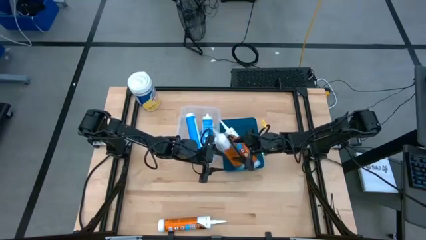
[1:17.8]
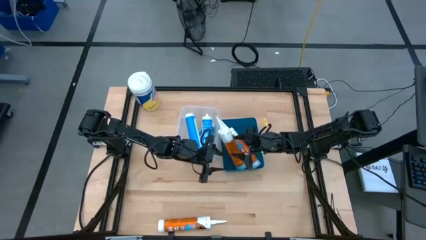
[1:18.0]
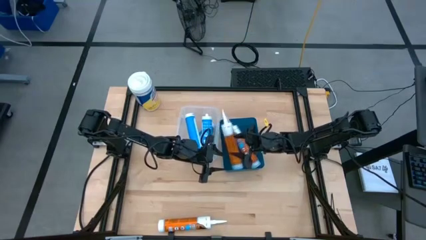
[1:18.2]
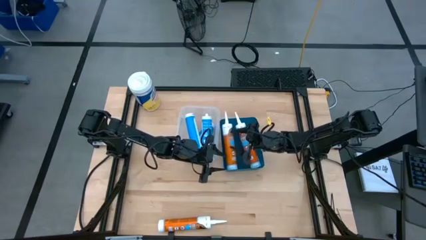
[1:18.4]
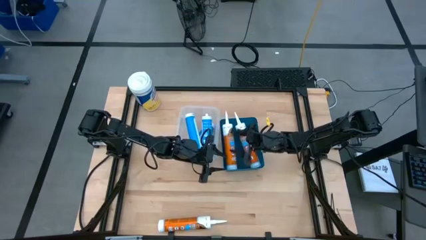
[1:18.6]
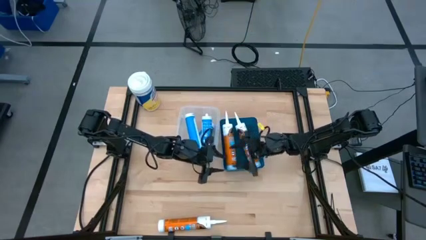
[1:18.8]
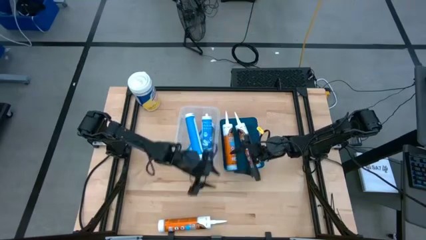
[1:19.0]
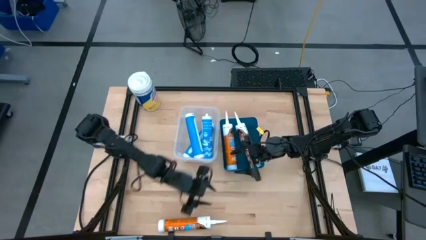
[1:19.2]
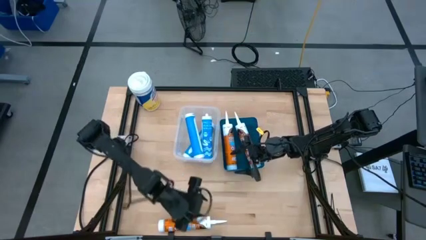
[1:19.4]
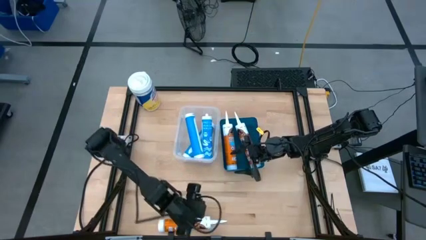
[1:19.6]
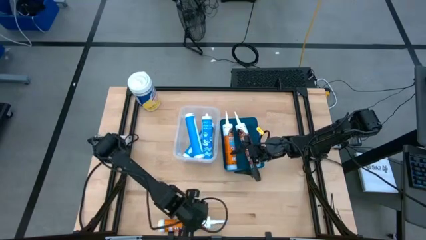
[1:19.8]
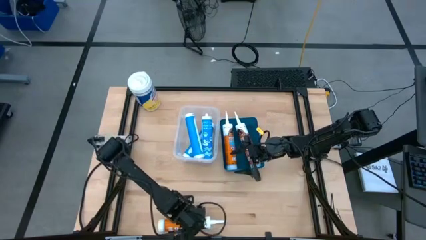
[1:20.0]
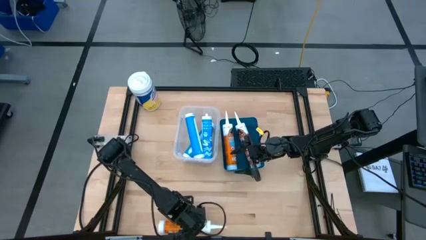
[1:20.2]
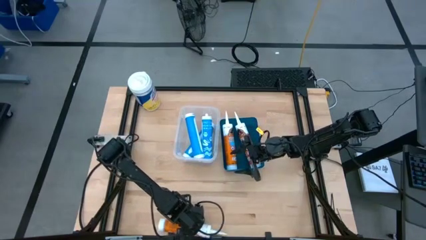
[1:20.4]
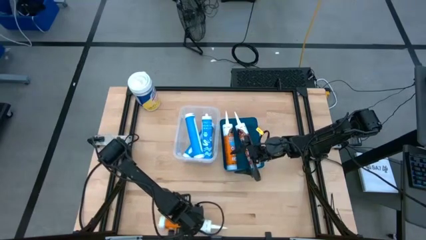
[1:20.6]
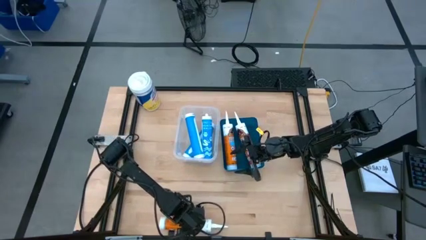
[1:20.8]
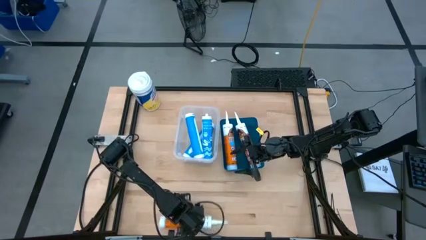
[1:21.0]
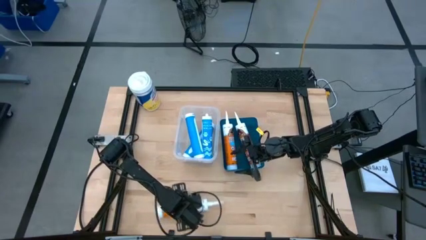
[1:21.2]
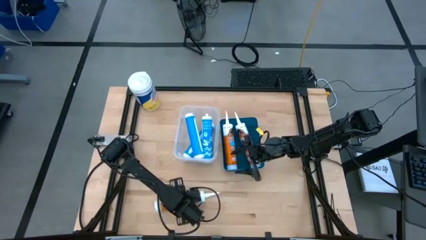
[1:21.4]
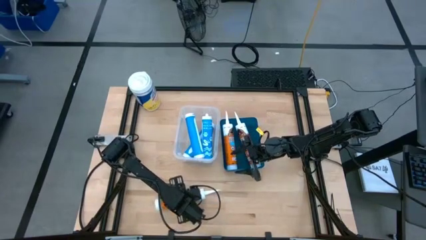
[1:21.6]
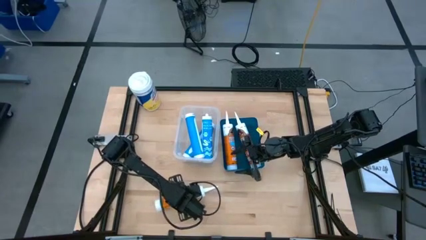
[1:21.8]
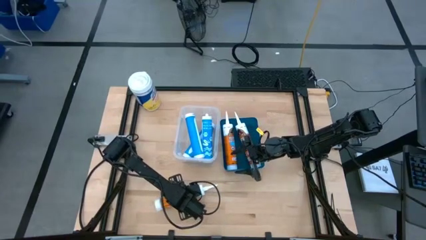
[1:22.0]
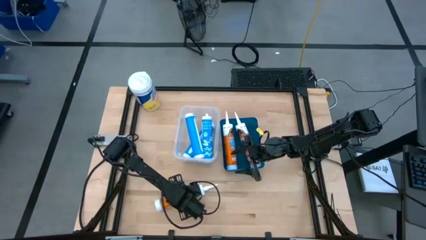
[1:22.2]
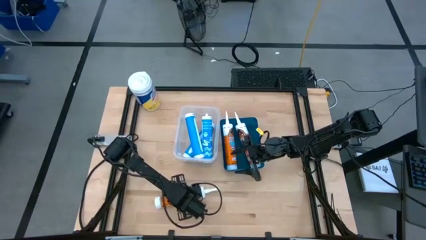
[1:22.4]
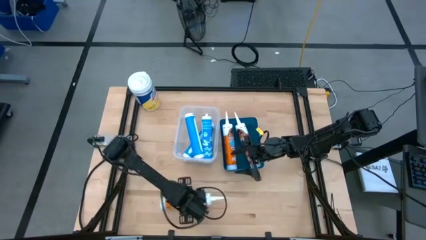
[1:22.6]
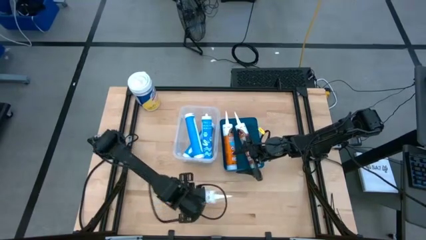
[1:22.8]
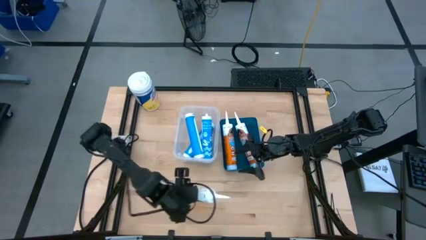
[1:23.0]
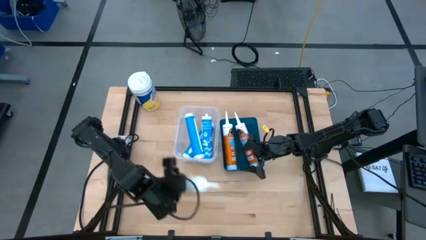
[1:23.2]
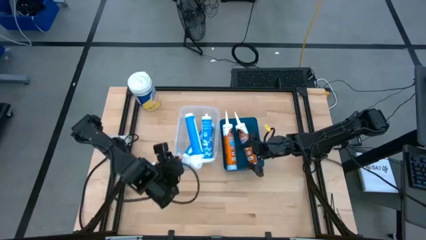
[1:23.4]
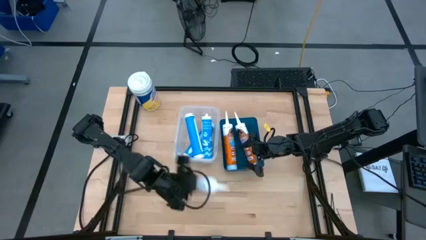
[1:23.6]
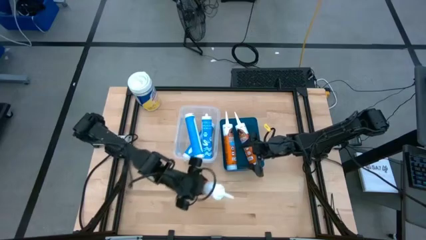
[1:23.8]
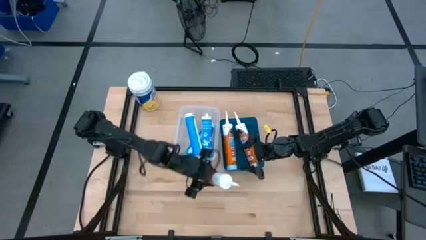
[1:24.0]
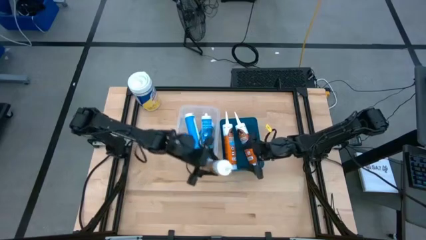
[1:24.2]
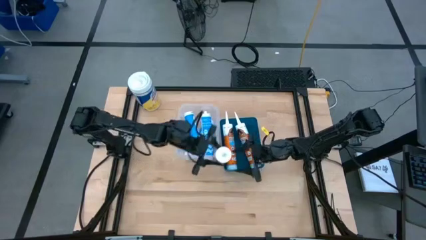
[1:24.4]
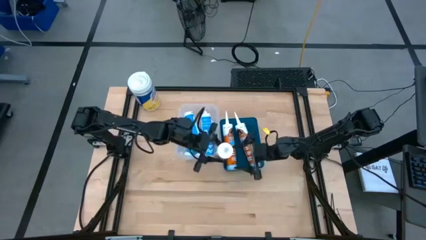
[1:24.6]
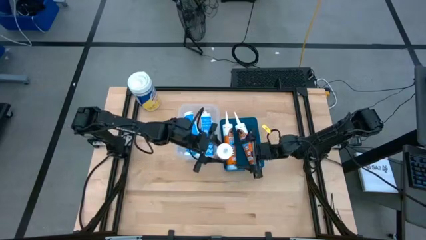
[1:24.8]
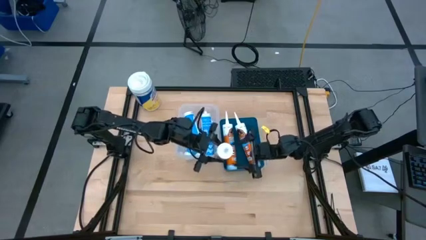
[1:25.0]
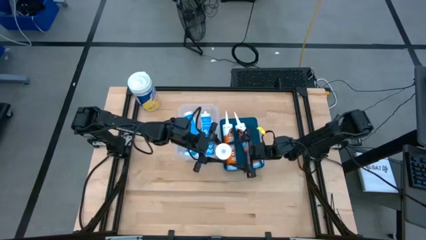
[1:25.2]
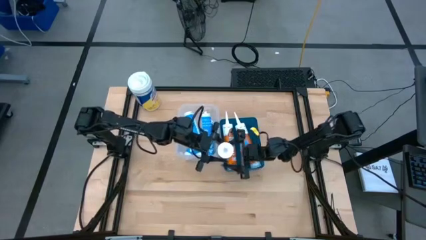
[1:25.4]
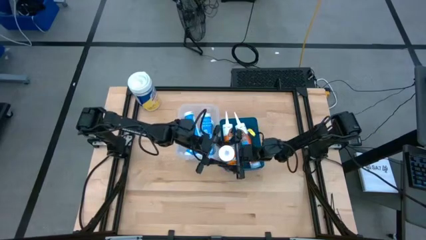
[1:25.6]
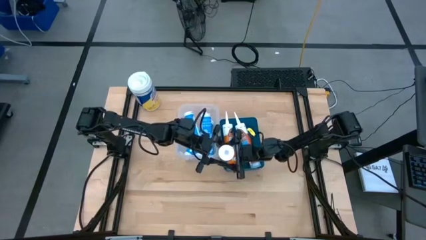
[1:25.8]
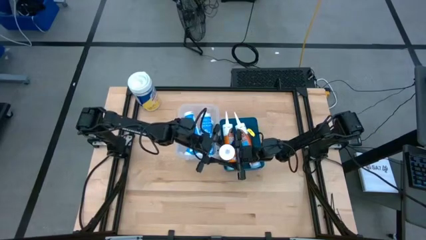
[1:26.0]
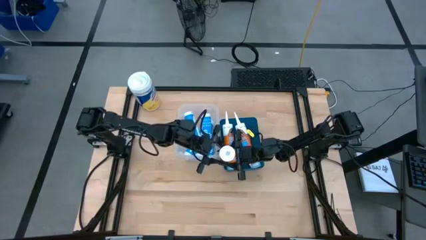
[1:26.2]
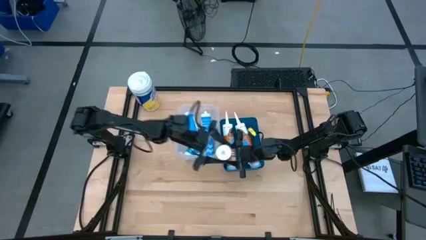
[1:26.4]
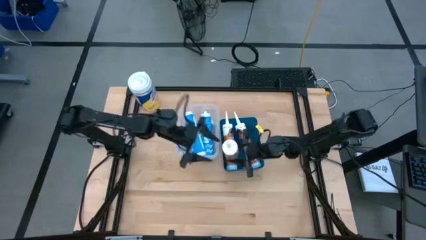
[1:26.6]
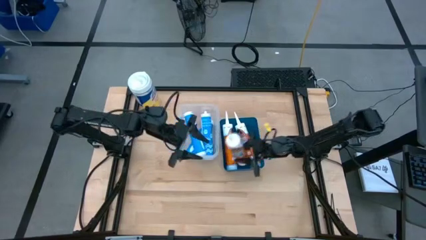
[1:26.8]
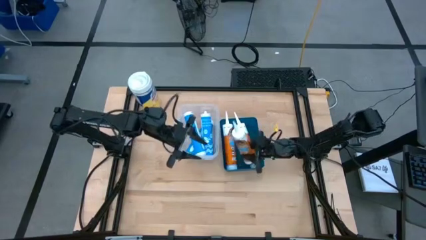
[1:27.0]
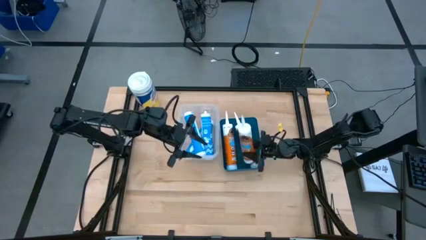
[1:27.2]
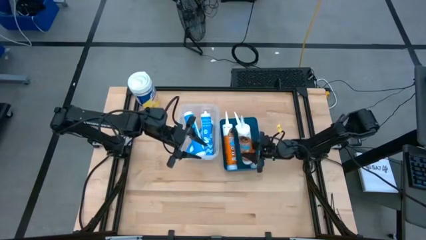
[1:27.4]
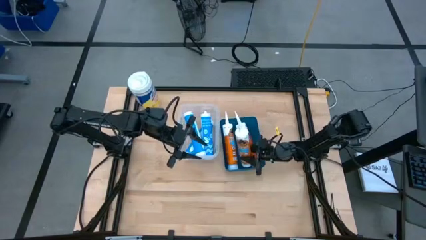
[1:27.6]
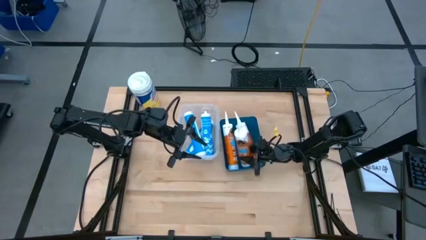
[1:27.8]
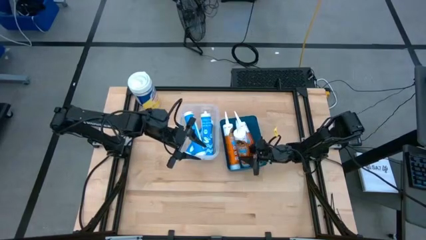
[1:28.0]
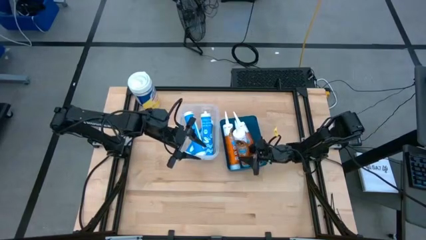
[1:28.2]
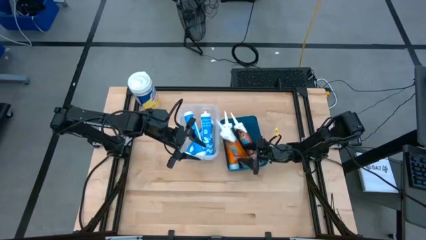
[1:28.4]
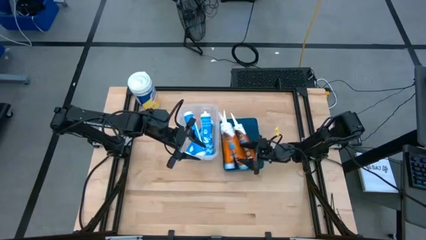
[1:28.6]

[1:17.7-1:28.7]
Task: Pick & place silicon tubes, Sealant and Lysol wipes
Put the orange sealant into the blue bin

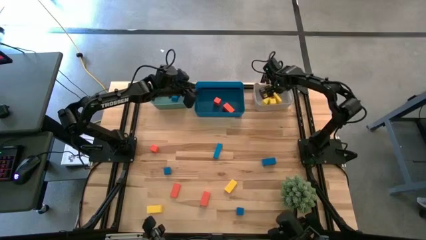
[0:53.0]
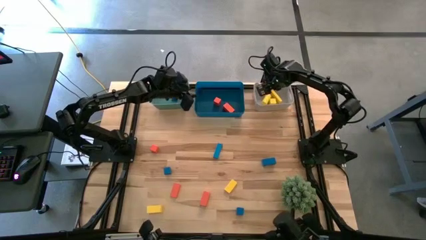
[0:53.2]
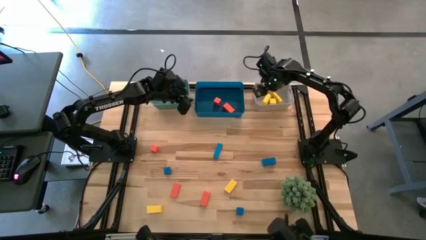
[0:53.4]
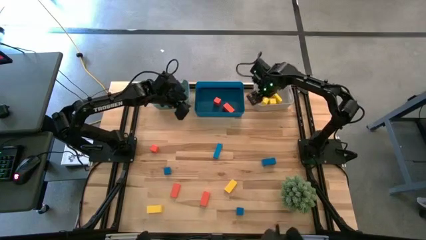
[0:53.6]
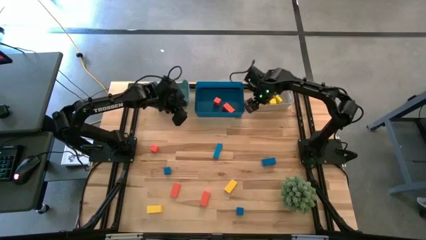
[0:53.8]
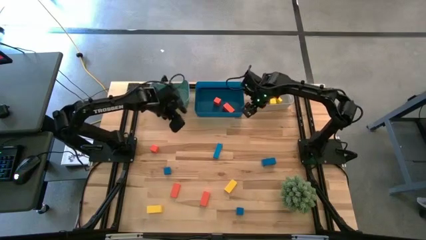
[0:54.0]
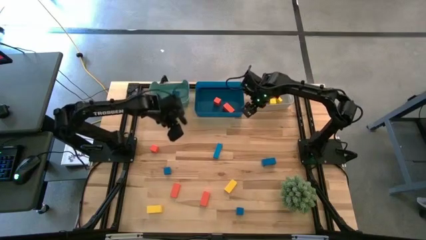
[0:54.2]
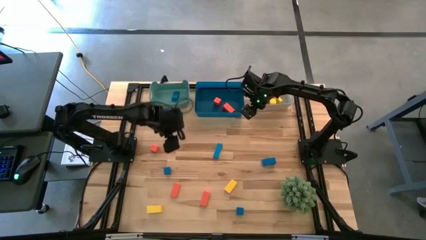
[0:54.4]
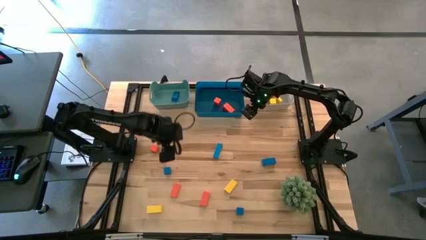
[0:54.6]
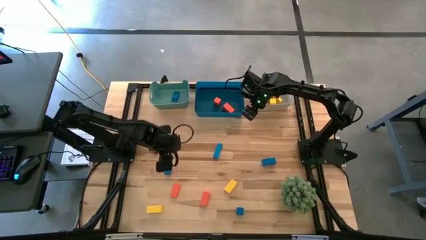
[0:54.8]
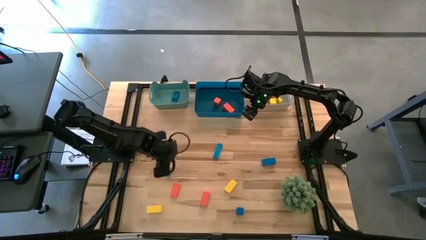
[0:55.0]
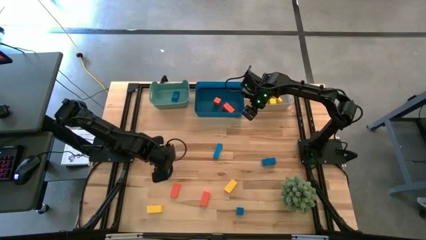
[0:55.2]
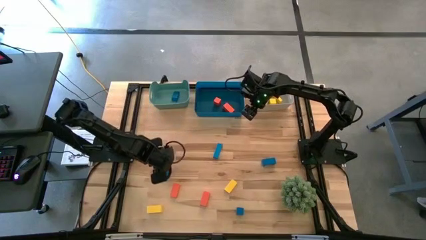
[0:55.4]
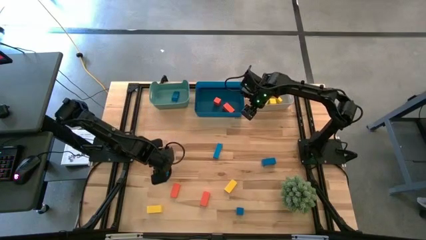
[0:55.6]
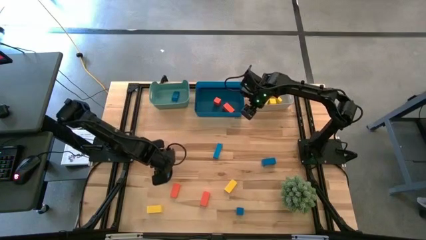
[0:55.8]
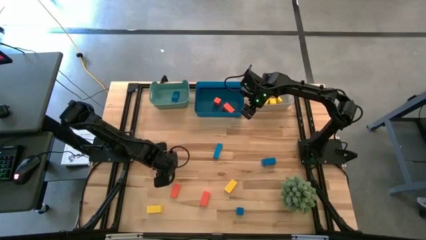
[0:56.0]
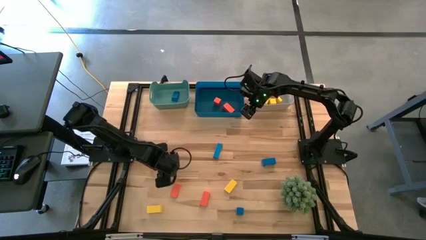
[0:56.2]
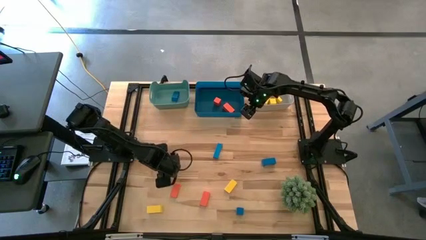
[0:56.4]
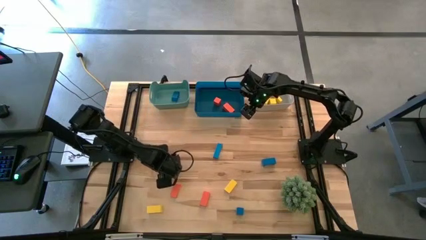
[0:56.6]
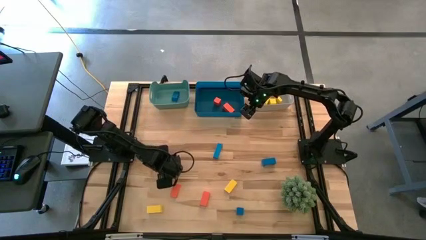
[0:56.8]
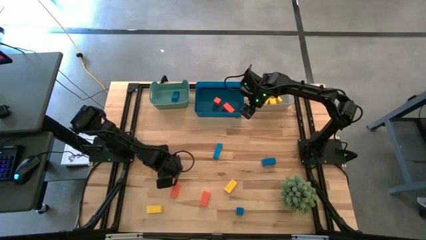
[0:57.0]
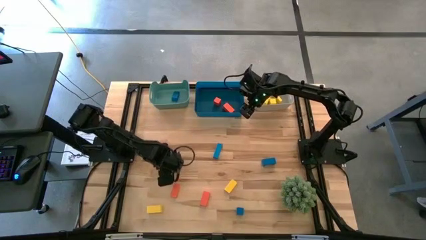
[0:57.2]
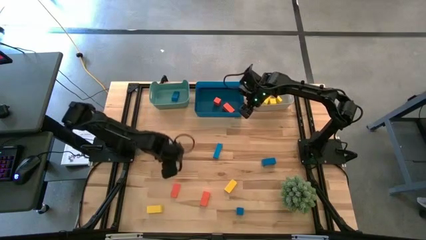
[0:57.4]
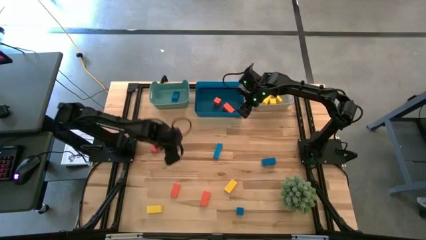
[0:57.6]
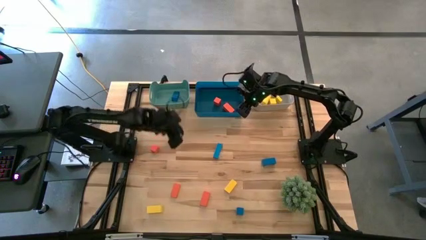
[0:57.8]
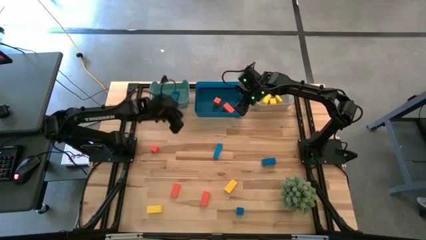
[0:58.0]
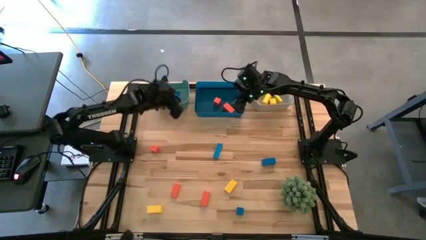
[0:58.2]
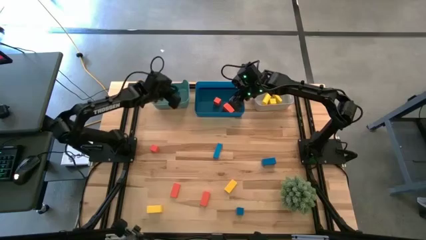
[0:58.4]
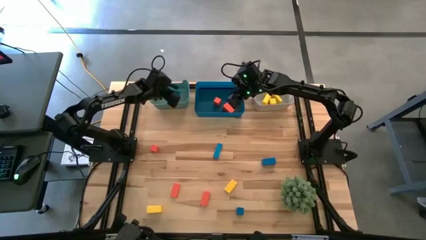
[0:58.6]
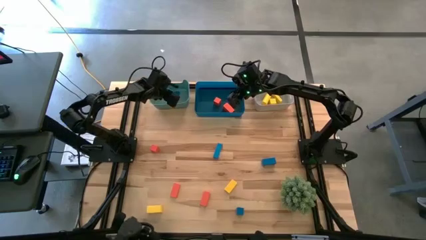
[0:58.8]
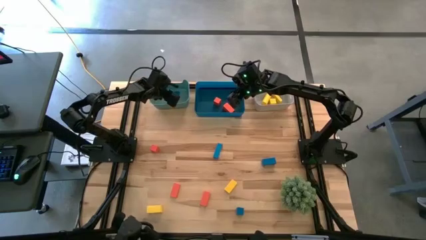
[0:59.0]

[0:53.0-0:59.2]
Task: Sort & place blocks by color
Put the blue block into the green bin
